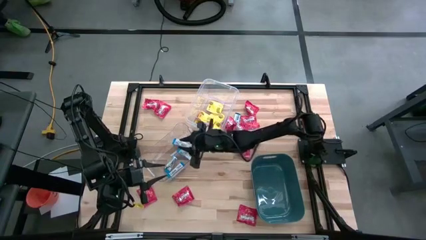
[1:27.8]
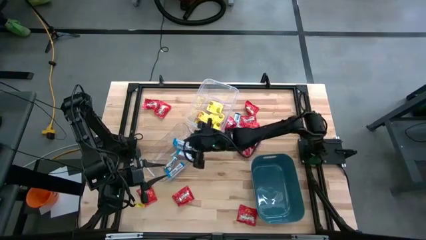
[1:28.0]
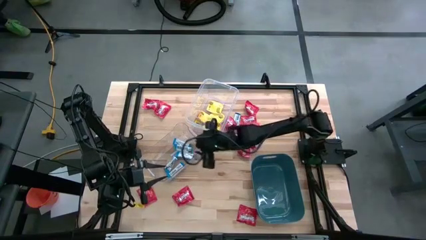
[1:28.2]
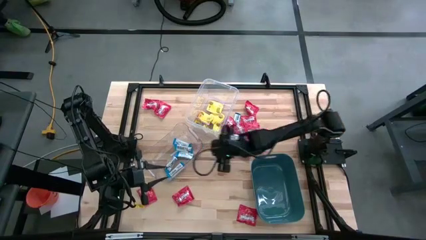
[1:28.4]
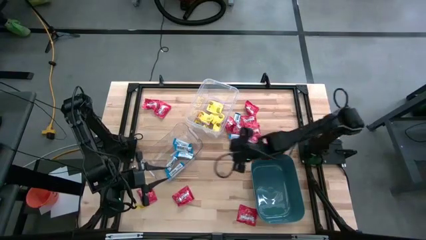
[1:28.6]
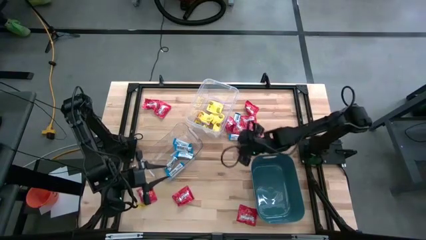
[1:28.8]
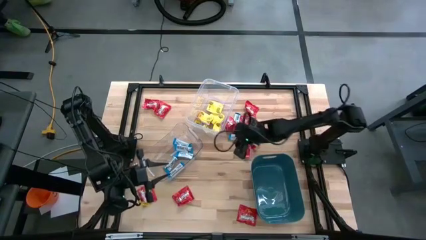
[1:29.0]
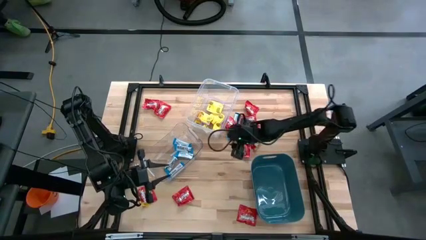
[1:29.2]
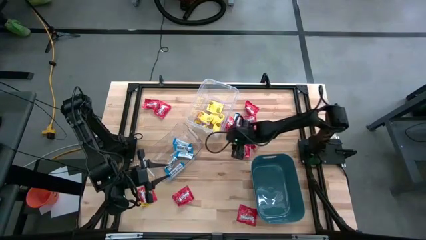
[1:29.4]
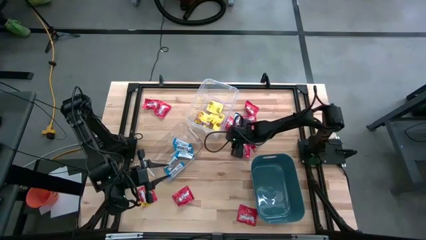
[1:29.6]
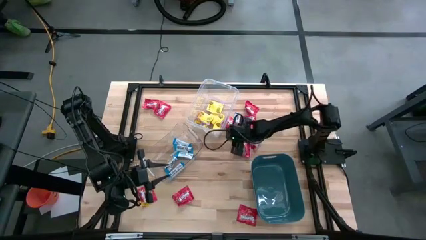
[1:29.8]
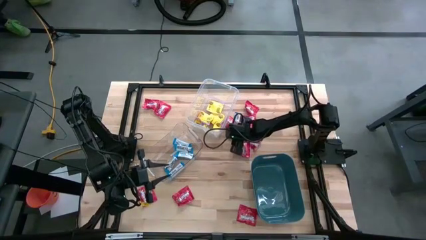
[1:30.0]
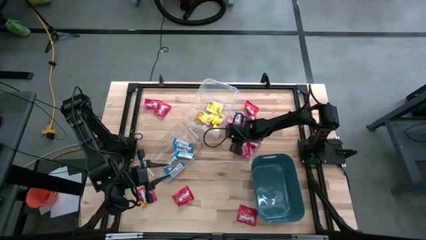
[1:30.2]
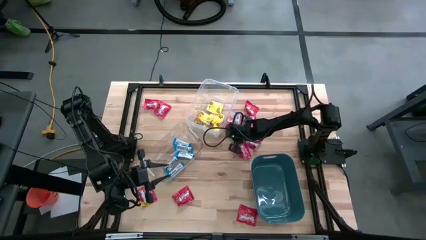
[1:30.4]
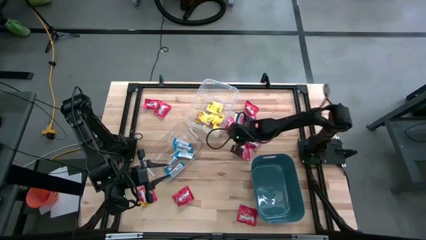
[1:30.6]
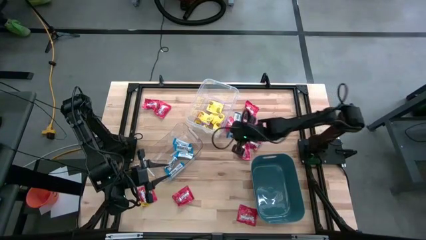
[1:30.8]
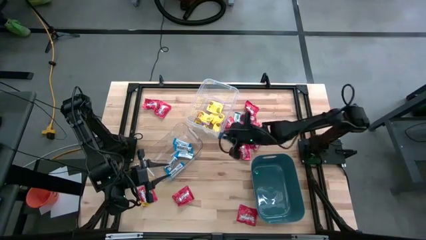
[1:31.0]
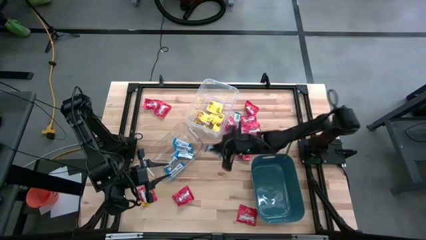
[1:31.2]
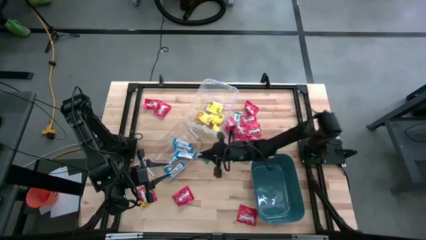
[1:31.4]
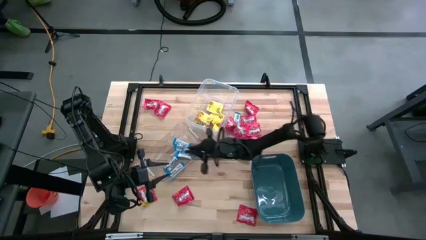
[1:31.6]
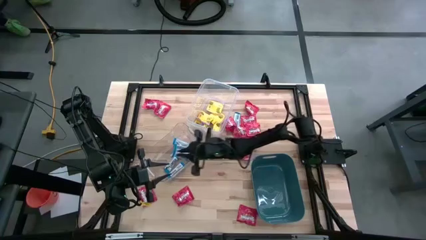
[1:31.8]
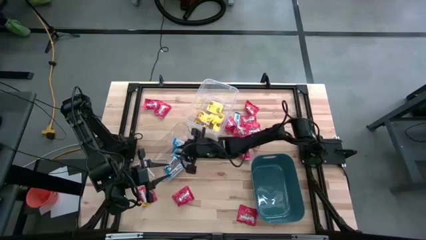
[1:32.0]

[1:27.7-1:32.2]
Task: Sort candy
Put the white chocolate into the transparent bin

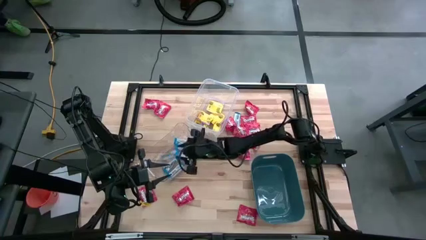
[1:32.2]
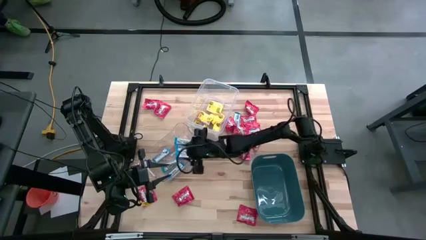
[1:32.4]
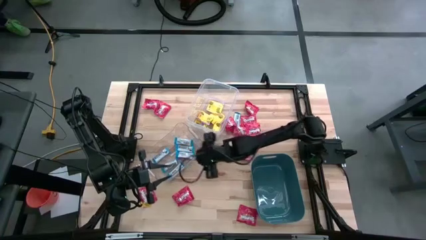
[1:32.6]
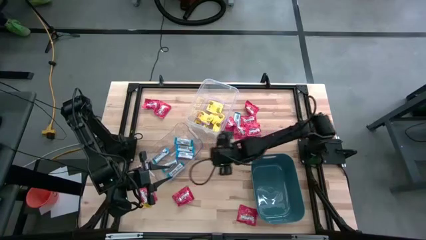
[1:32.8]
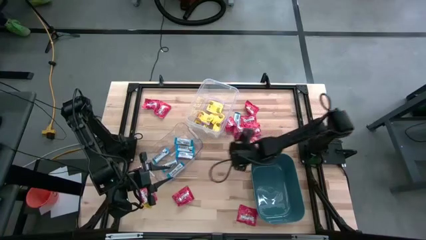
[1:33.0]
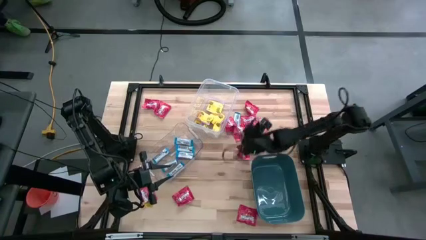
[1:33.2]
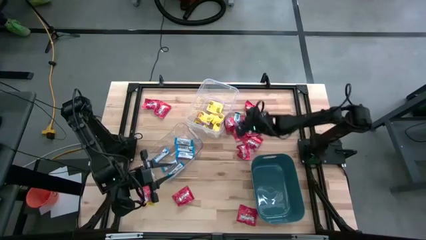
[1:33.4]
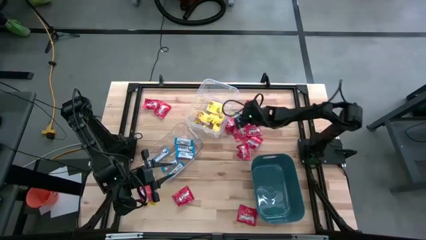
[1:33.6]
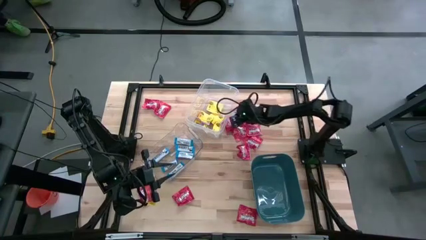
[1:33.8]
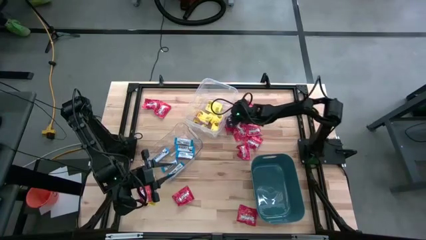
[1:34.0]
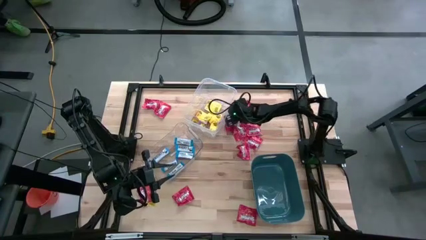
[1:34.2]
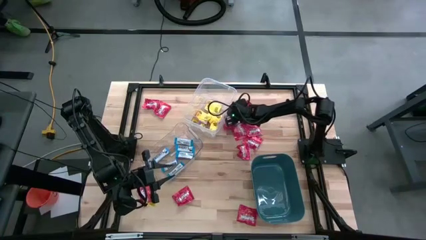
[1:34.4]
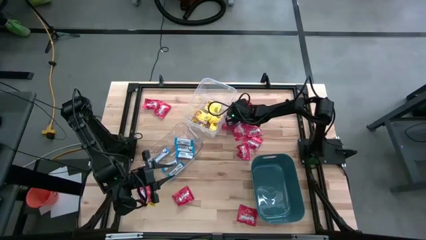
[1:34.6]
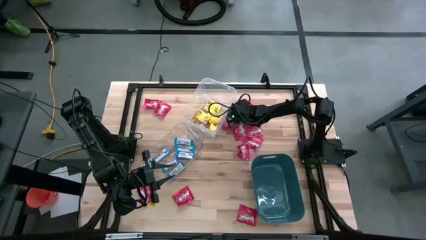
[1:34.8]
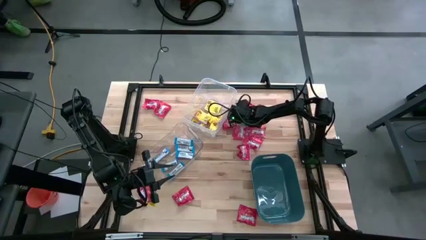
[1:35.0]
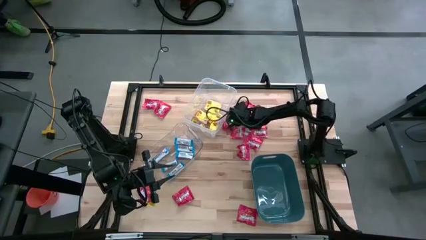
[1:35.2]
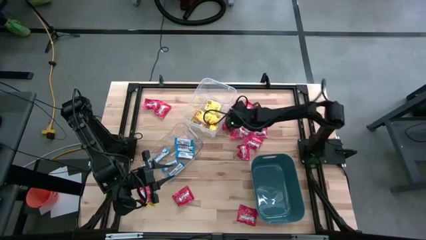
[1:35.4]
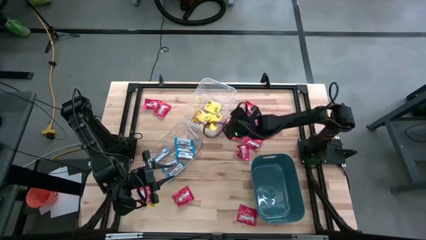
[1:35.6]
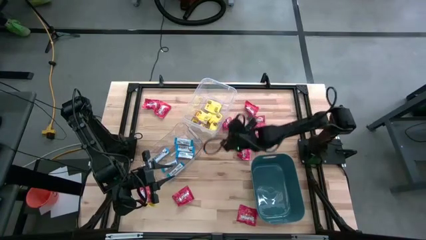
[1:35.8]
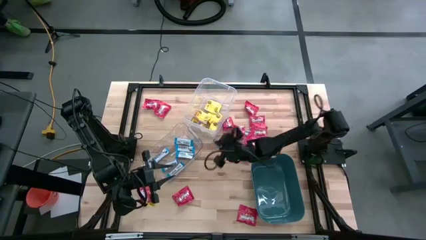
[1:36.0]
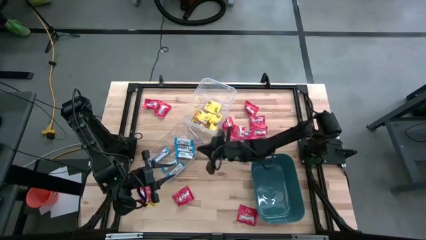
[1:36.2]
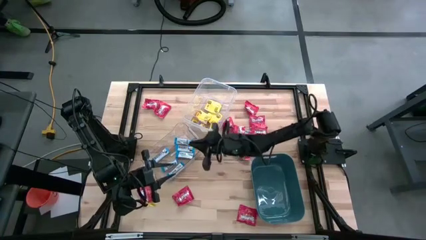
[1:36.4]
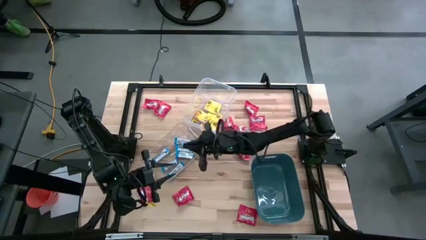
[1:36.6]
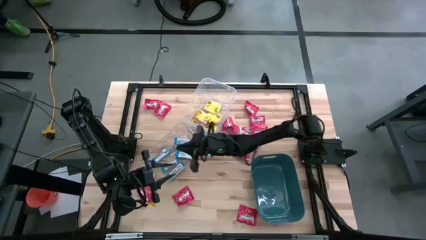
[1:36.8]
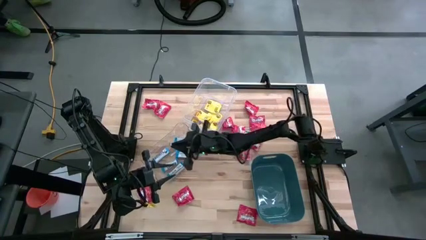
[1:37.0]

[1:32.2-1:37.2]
Put the white chocolate into the transparent bin

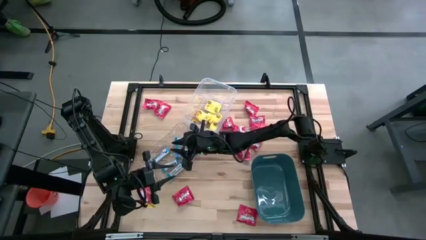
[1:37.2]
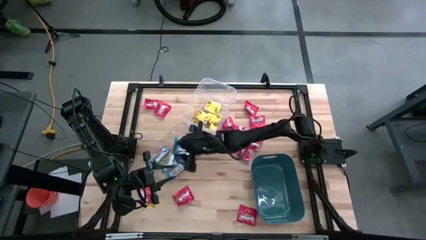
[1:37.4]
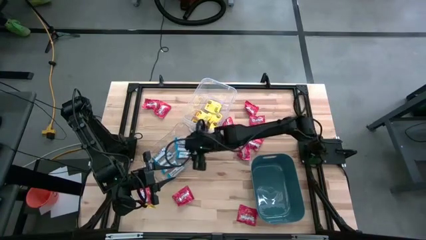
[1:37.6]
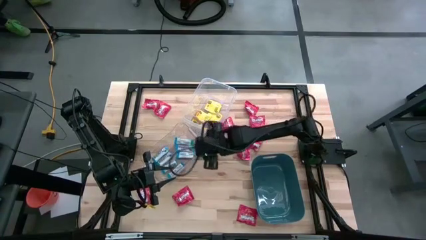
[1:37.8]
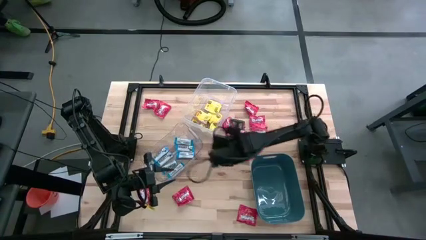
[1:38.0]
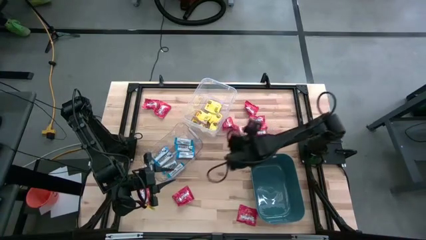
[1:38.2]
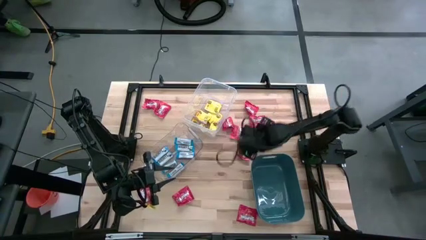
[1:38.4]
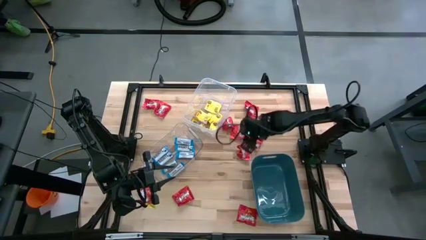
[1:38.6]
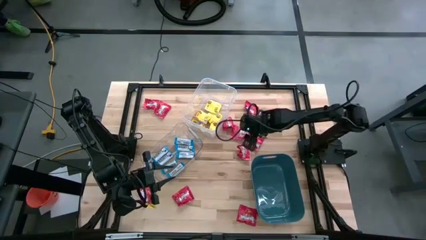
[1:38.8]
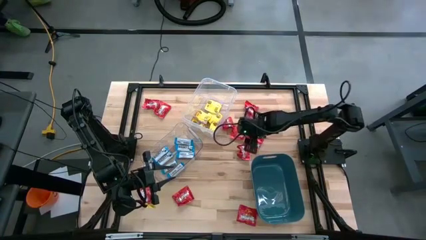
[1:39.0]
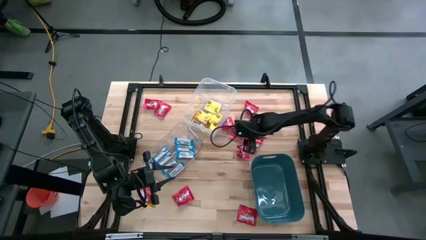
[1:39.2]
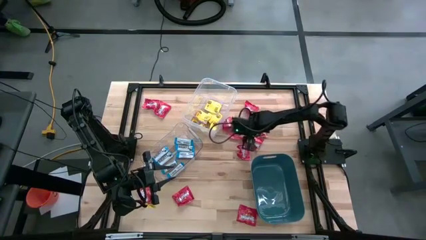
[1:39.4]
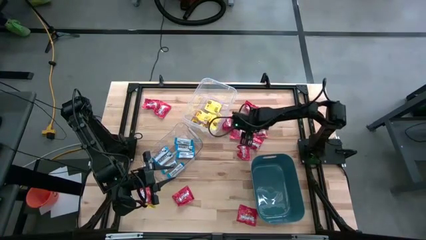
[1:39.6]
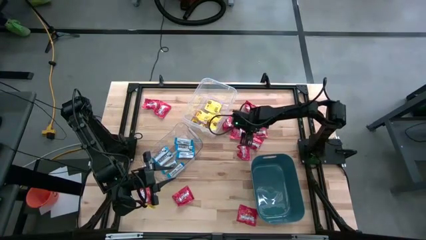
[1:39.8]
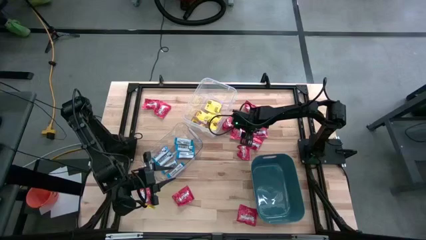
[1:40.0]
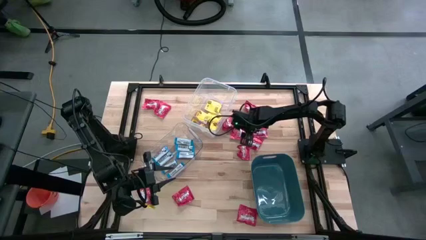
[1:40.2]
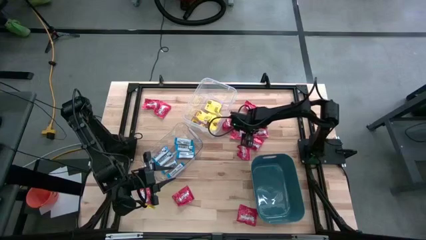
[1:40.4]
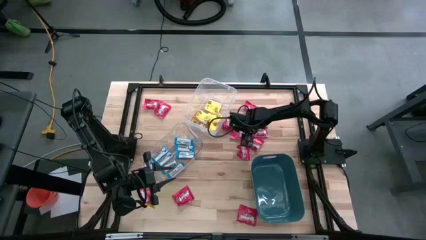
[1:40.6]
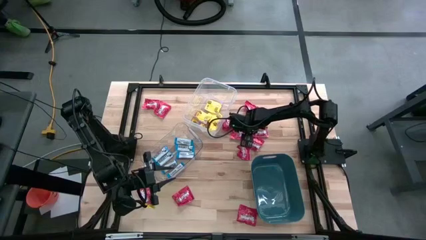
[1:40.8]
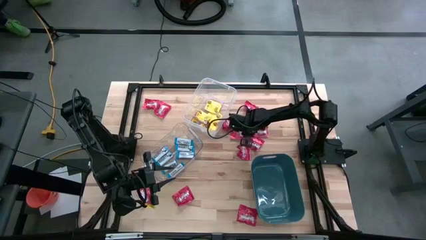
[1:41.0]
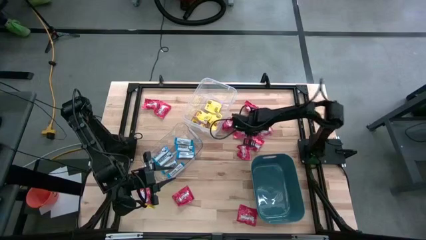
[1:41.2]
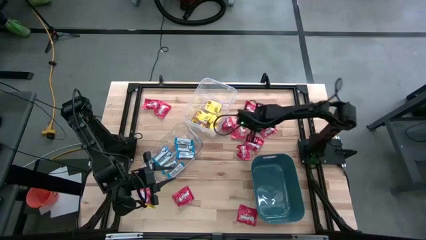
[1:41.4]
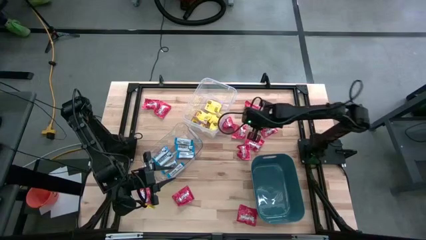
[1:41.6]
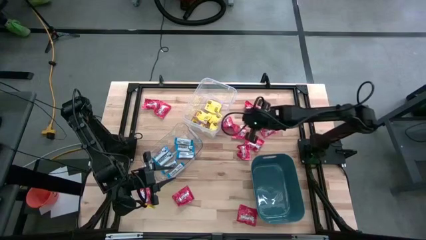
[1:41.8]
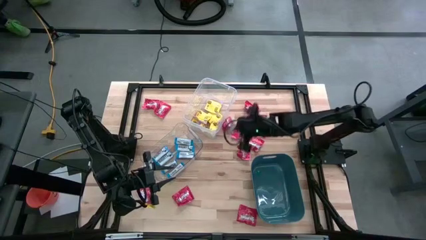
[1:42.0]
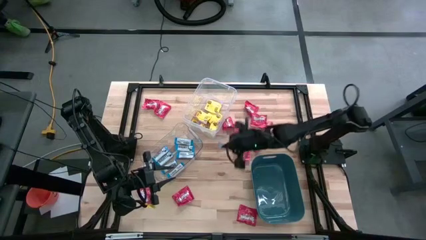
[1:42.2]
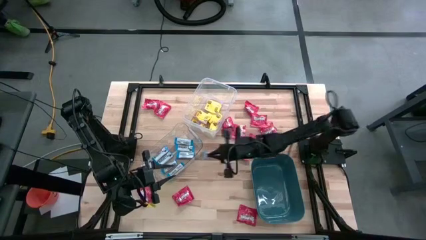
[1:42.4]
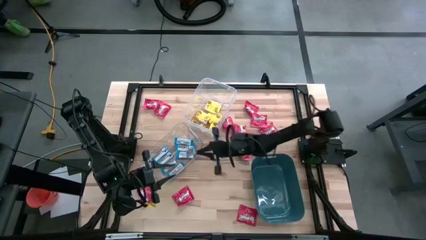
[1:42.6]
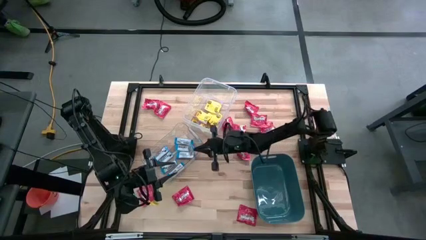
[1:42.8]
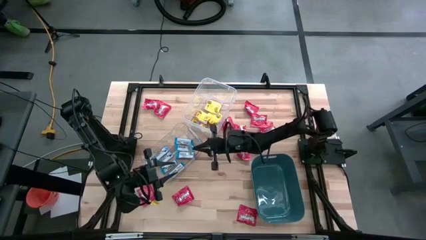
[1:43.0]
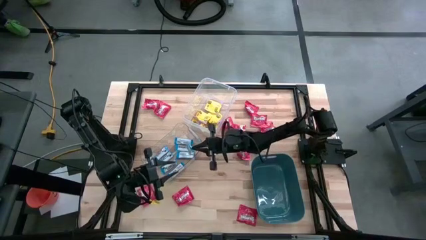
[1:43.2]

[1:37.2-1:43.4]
Put the white chocolate into the transparent bin

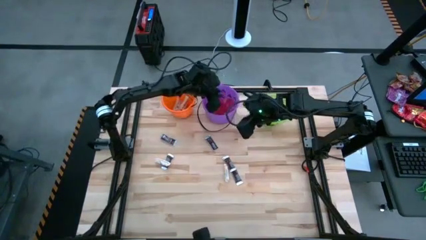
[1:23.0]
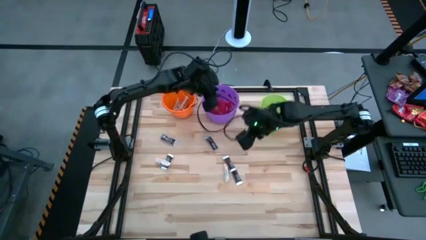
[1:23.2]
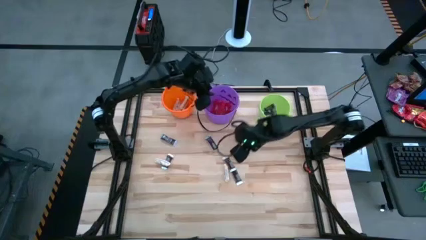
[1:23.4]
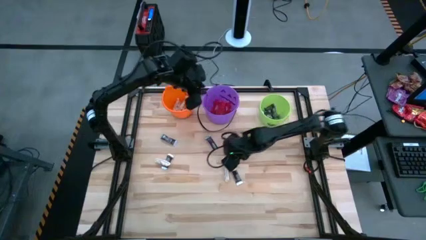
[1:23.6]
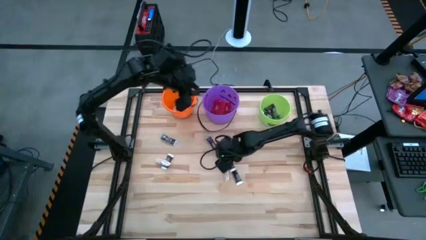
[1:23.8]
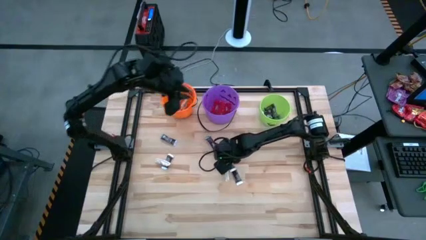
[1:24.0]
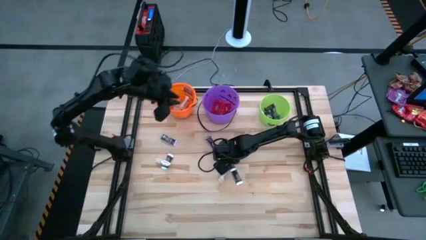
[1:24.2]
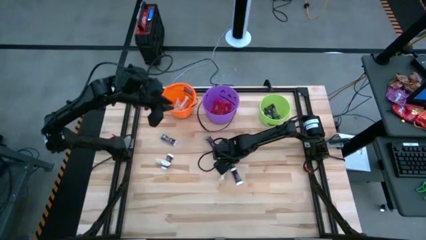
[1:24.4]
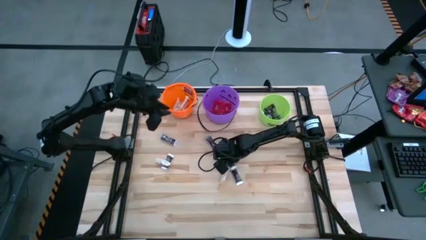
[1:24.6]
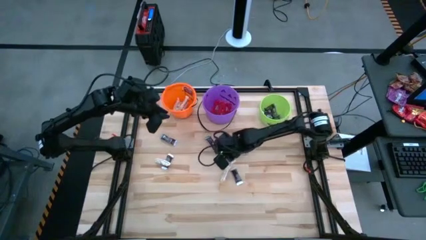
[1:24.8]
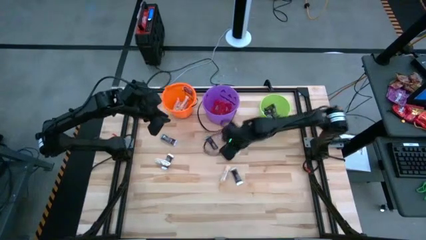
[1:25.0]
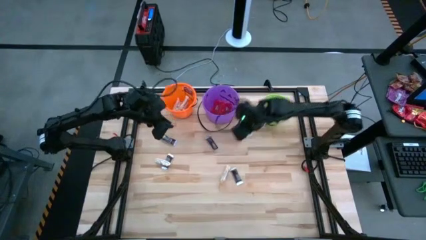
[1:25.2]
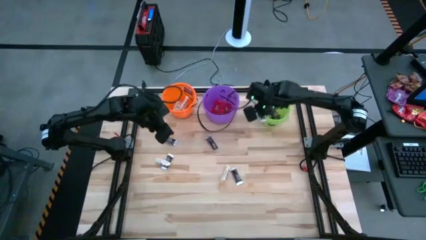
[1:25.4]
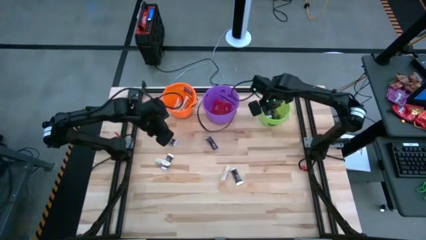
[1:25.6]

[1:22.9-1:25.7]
Task: Sort candy by brand, put in halloween buckets
Put the brown chocolate bar into the green bucket
